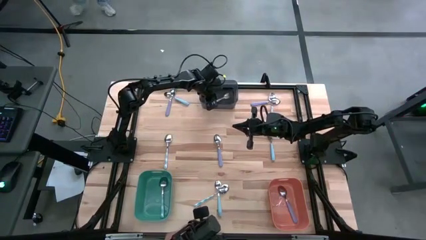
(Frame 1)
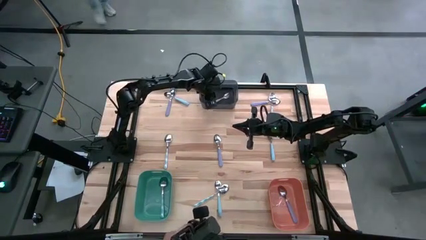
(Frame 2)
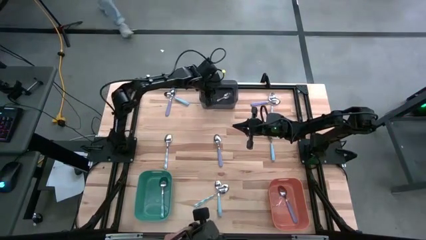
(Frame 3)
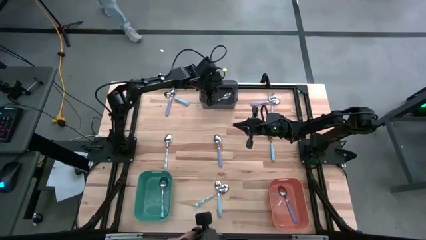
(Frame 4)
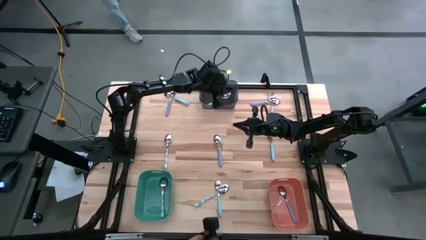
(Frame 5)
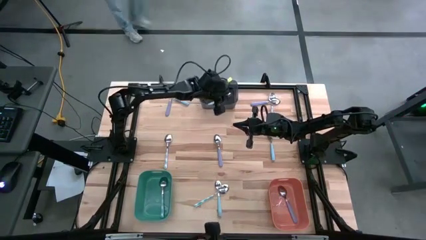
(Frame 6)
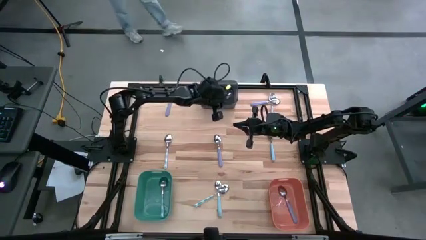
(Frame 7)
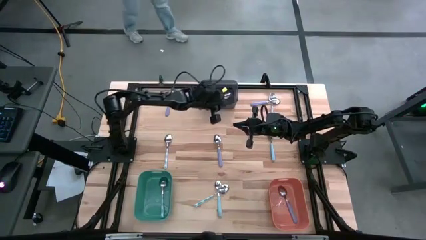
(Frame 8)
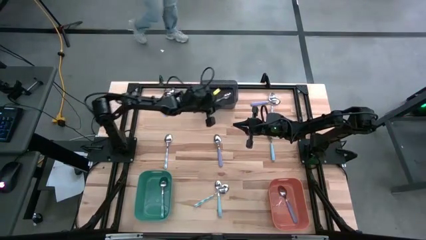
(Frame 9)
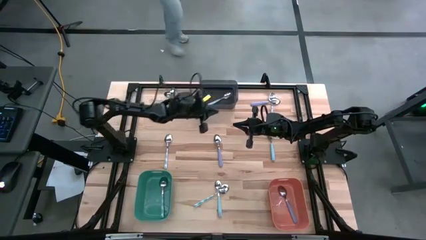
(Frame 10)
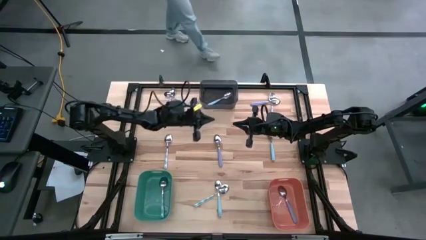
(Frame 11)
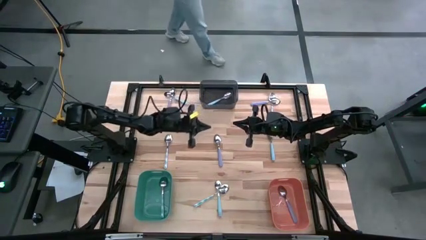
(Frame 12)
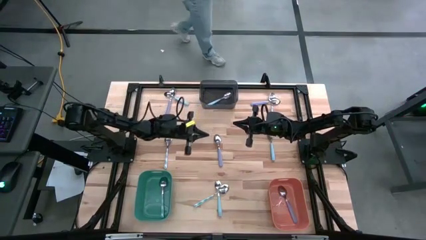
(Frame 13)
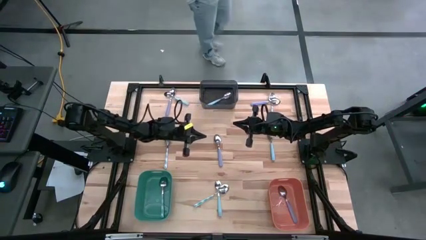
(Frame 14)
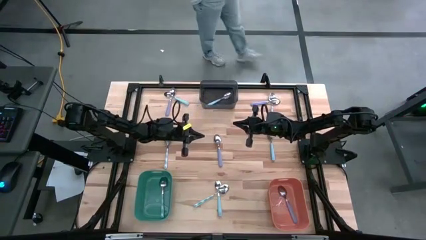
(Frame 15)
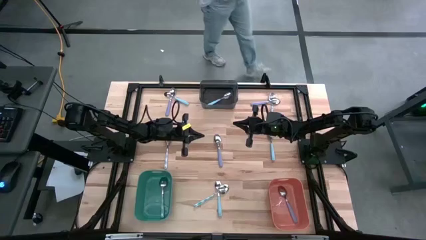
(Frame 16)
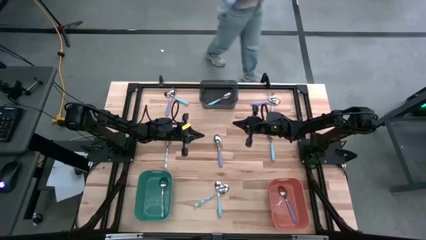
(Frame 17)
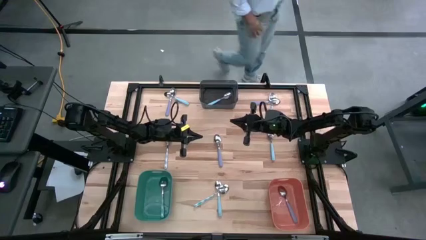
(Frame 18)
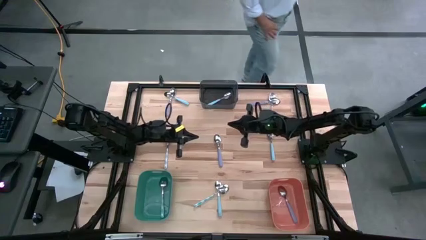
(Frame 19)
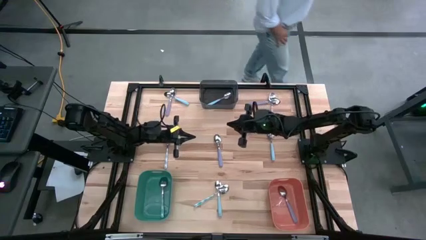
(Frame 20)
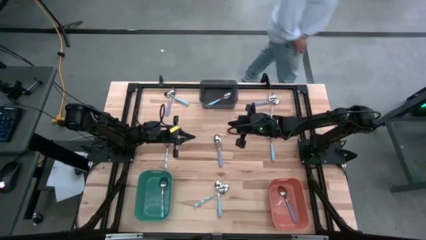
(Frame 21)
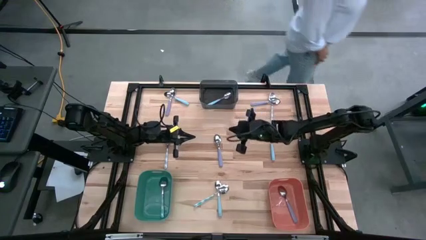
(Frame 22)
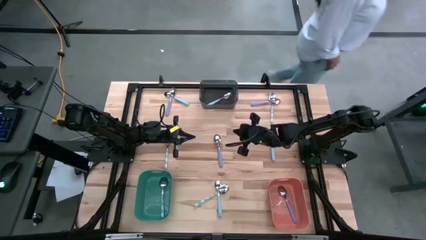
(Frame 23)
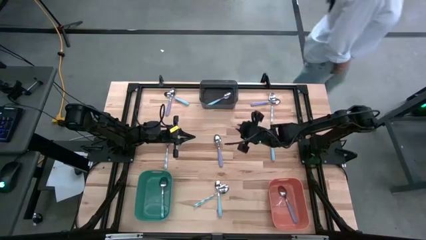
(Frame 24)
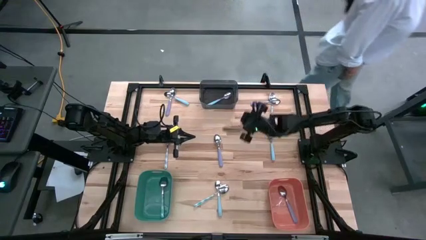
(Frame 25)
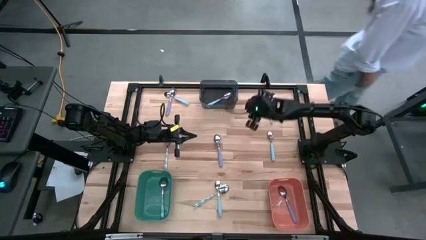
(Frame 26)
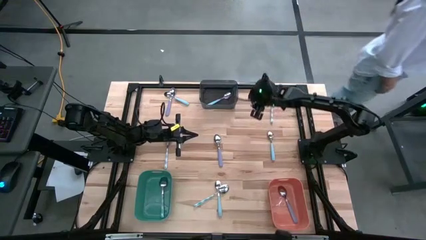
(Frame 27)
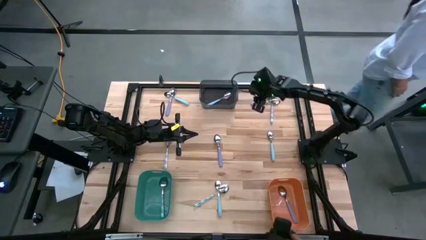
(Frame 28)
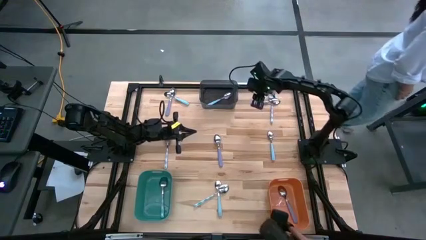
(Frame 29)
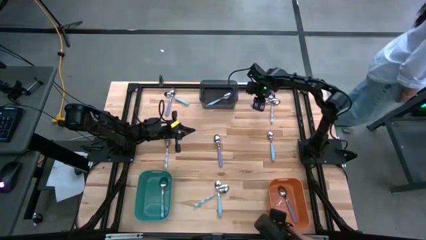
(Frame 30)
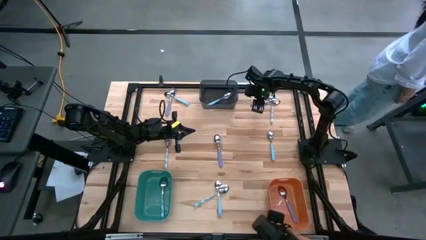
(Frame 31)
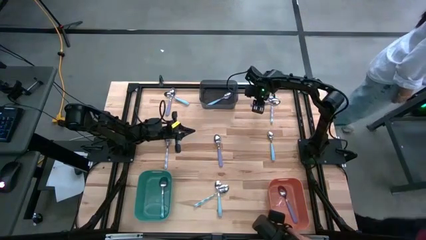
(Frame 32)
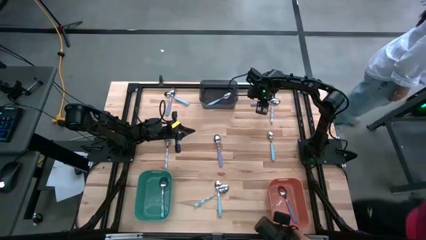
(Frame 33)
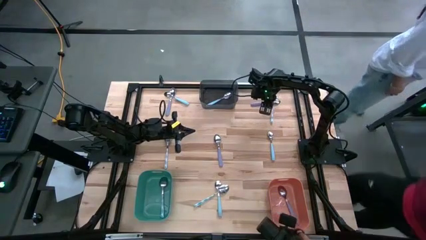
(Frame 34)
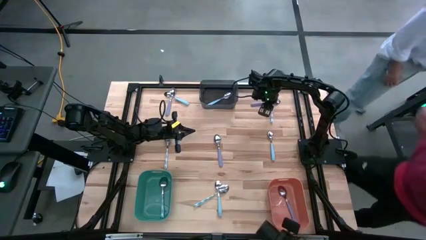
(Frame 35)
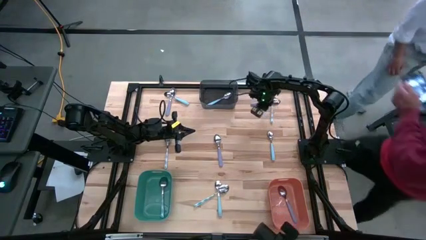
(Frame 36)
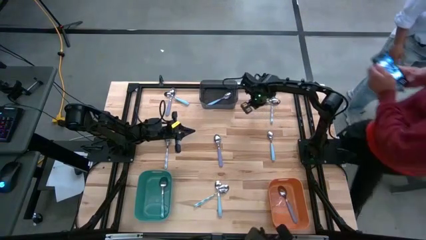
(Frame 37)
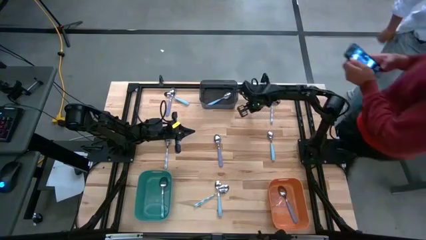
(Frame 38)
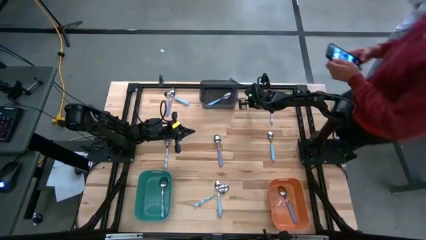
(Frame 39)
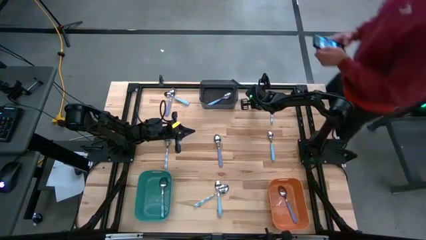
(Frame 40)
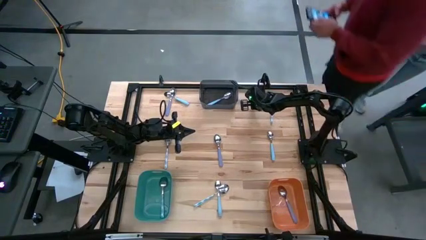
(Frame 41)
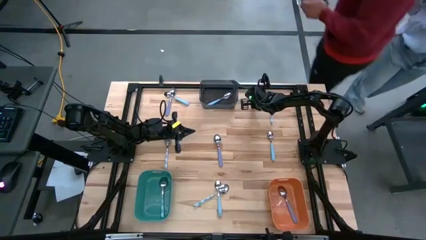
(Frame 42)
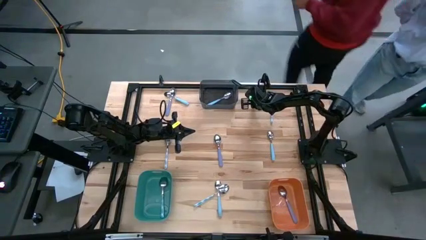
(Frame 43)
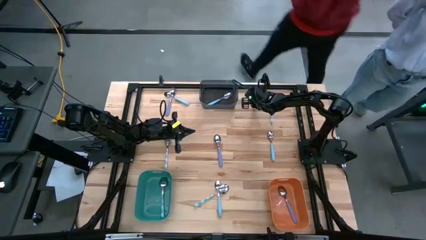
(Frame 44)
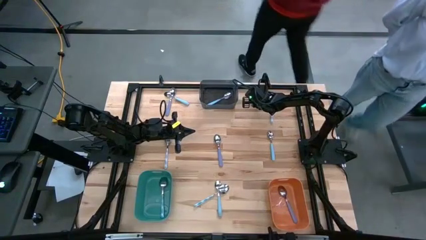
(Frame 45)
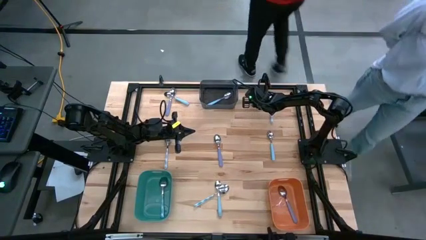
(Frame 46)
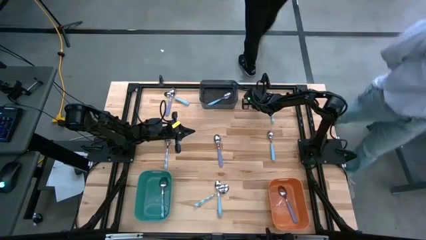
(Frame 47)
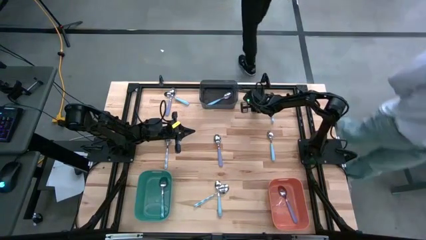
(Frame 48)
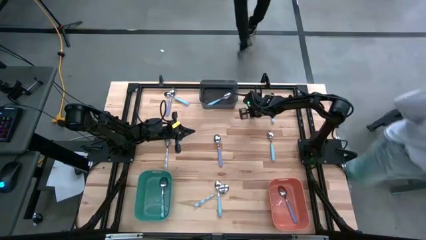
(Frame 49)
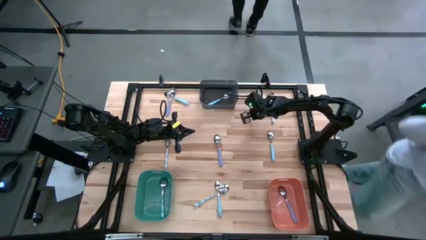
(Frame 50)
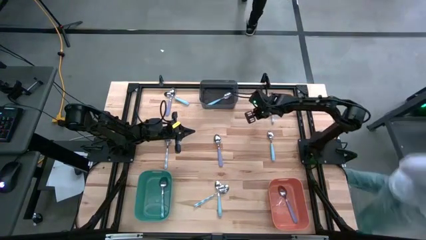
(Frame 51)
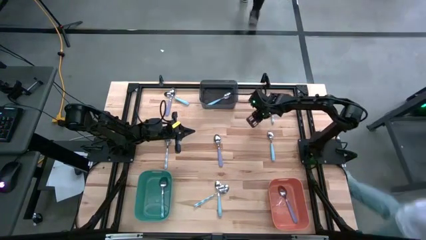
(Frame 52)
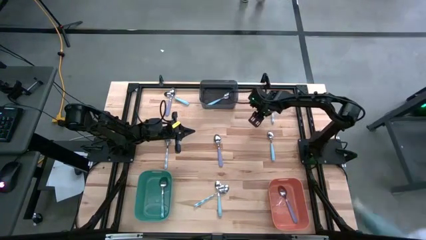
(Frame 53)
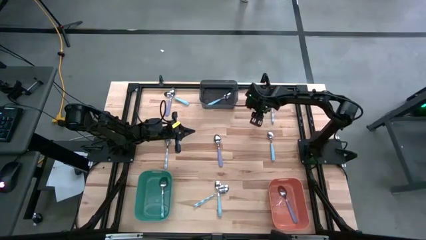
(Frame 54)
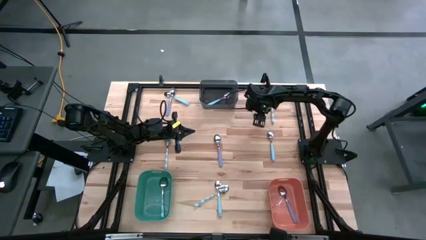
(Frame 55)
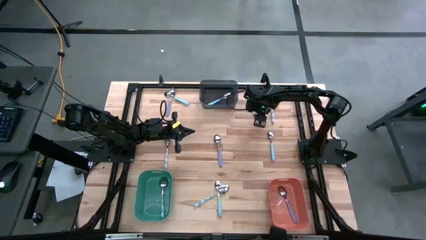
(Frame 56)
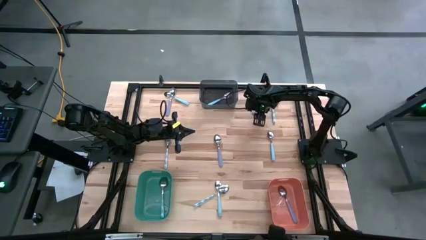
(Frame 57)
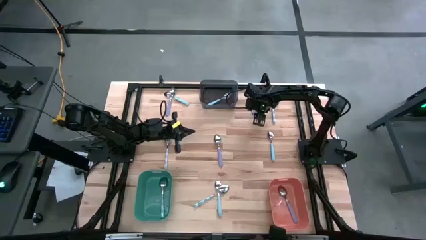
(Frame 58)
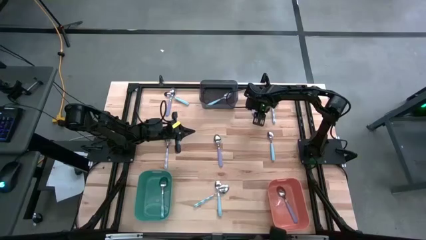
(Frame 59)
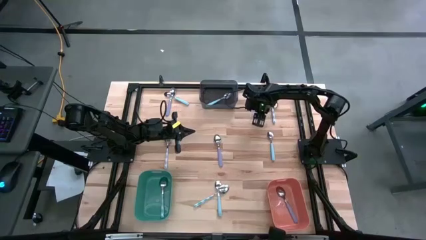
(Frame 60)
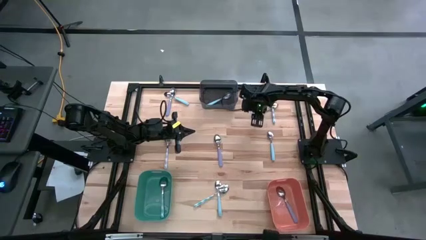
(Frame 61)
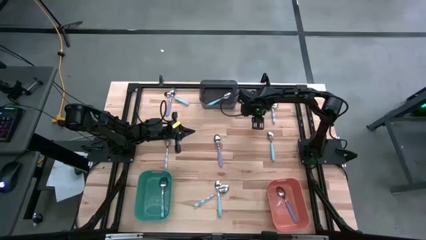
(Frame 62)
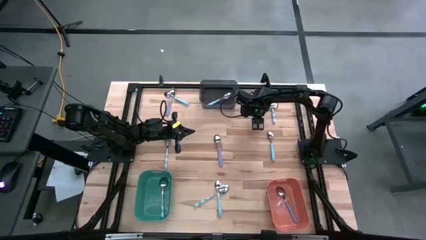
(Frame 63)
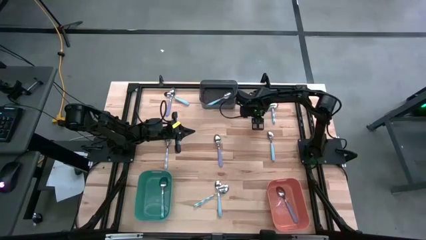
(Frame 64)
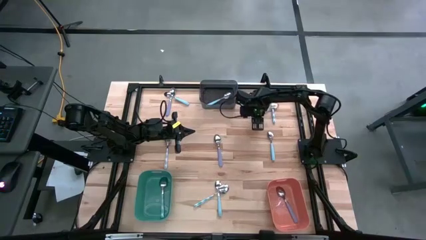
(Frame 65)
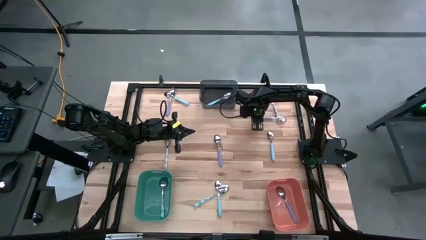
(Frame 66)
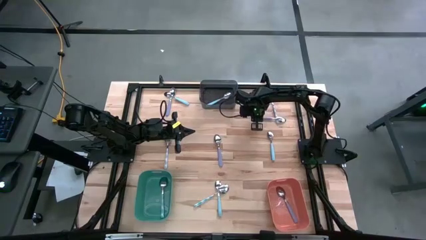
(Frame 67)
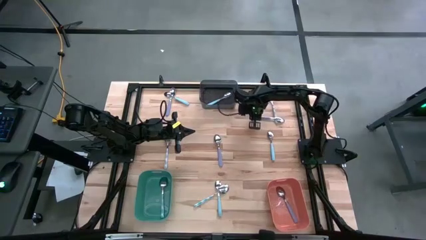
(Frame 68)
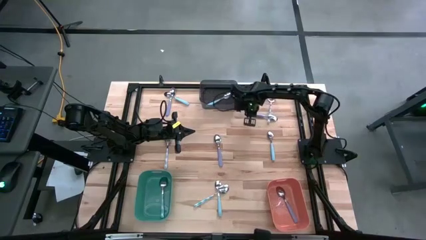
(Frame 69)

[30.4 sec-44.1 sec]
Task: Sort silverware by color (type)
Put the purple spoon into the orange bin

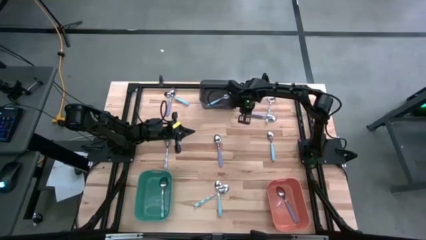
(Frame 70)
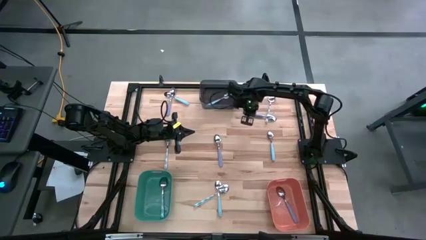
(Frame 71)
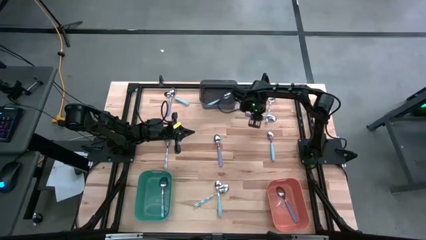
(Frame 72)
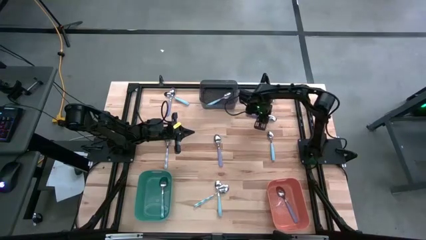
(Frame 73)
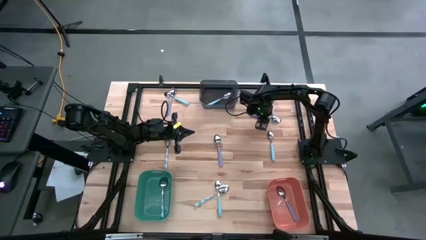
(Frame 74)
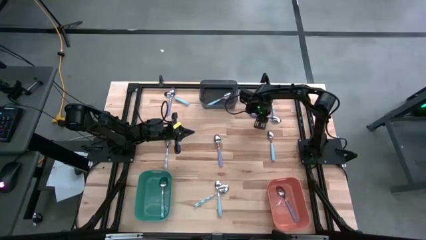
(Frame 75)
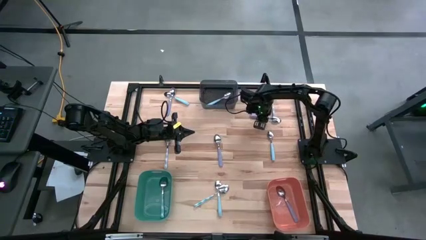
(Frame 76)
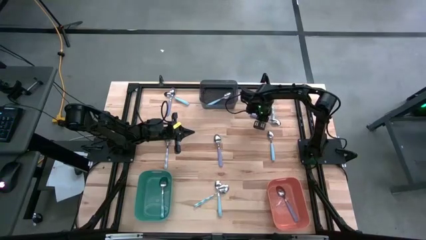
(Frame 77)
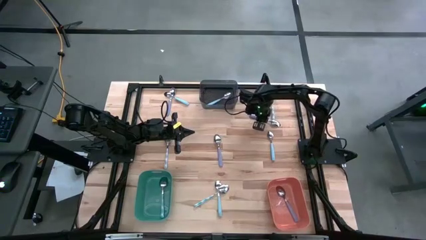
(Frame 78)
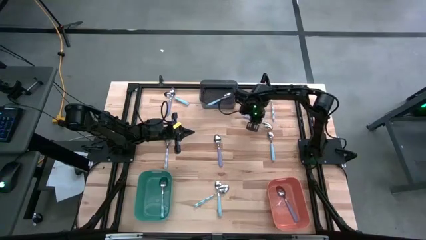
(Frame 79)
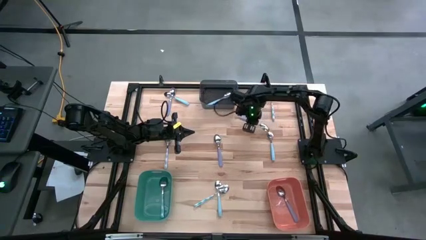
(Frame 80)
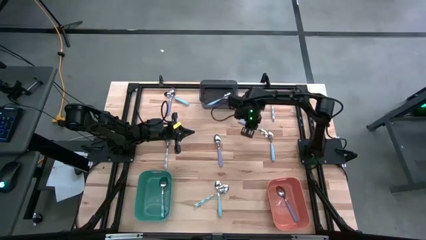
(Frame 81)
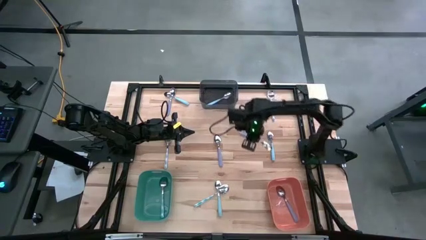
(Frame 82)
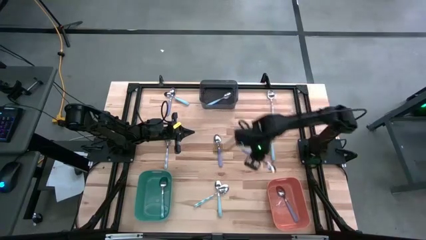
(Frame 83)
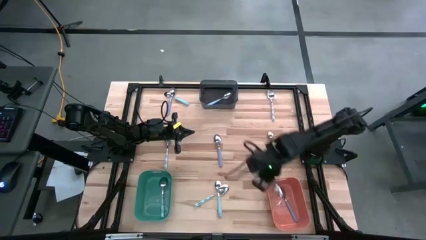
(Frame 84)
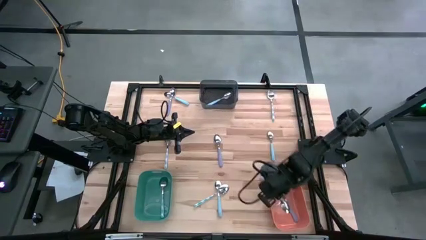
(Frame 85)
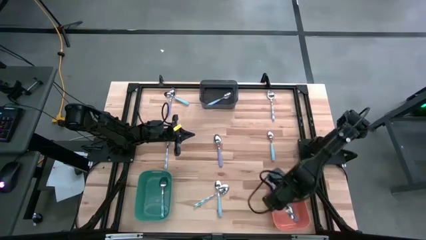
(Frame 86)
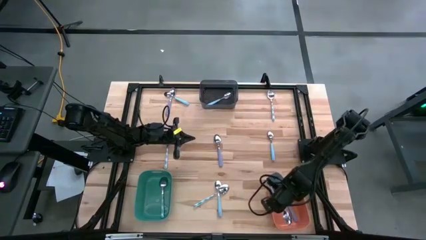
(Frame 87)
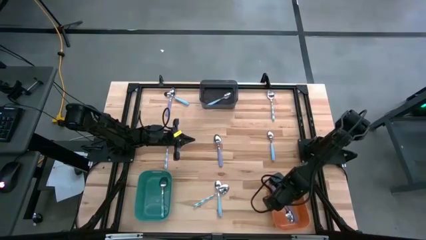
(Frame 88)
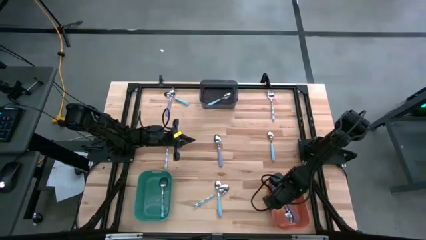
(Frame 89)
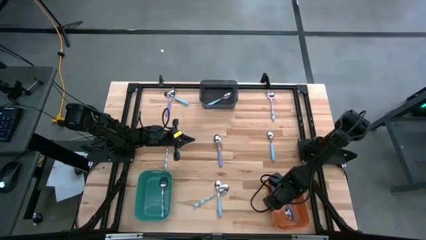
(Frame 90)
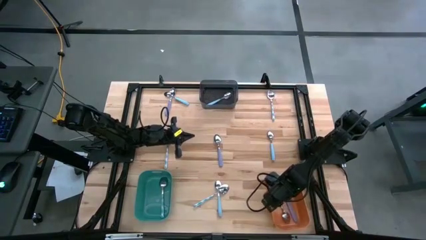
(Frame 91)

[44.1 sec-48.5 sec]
Put the purple spoon into the orange bin
